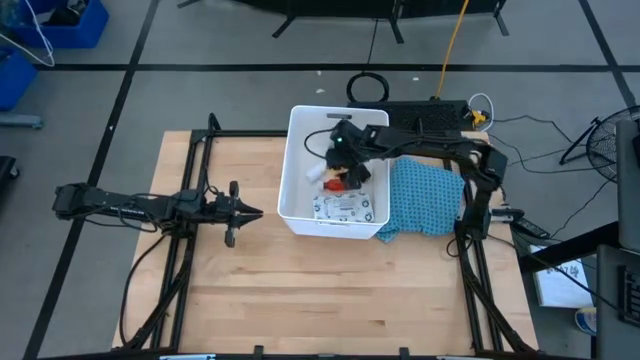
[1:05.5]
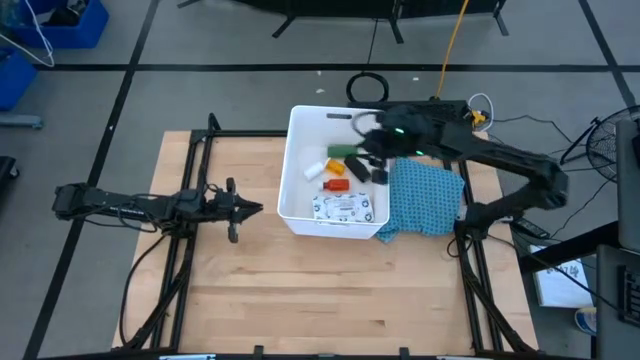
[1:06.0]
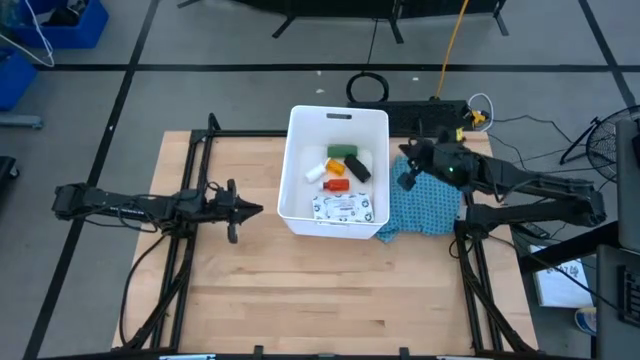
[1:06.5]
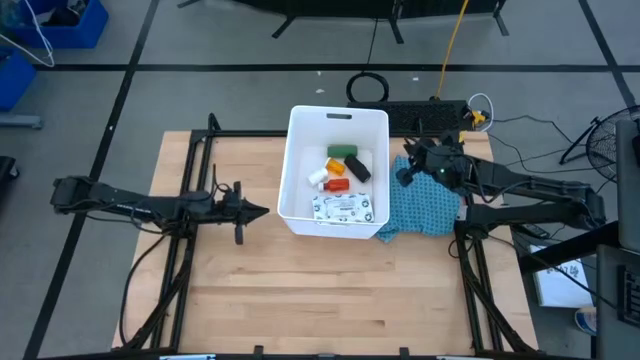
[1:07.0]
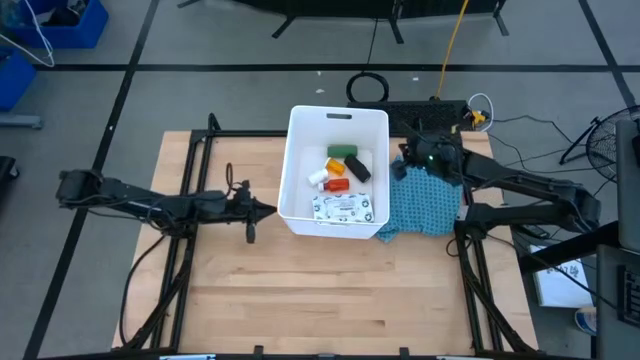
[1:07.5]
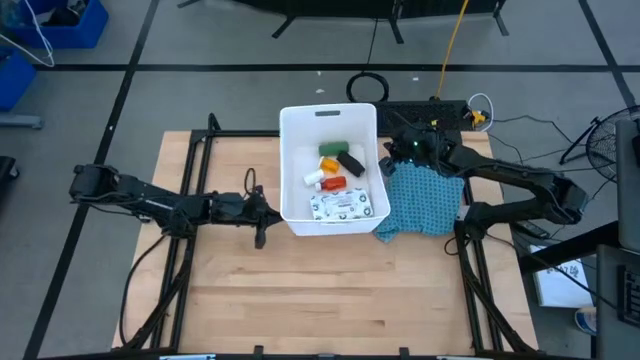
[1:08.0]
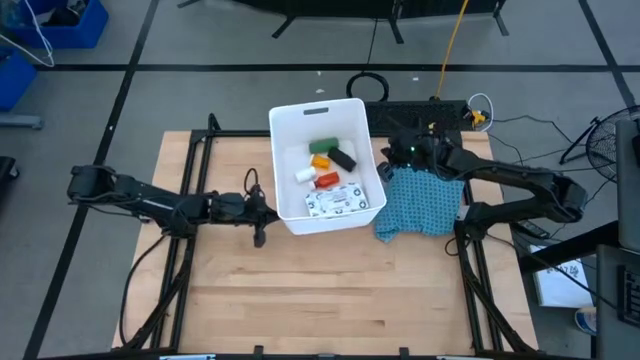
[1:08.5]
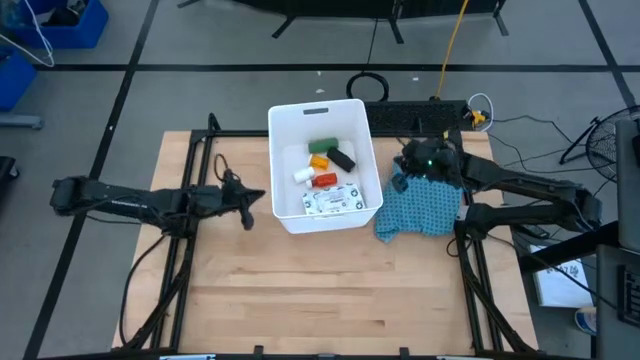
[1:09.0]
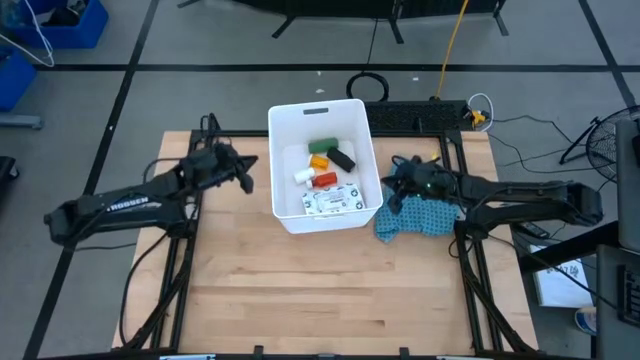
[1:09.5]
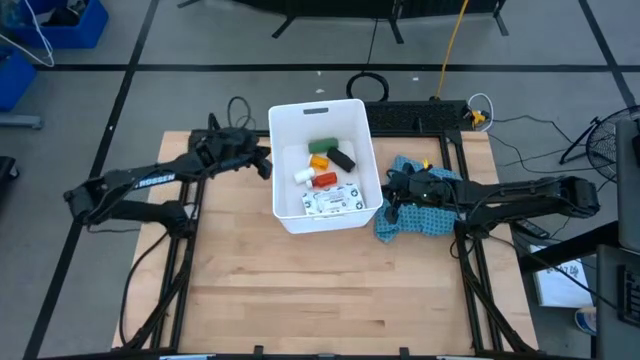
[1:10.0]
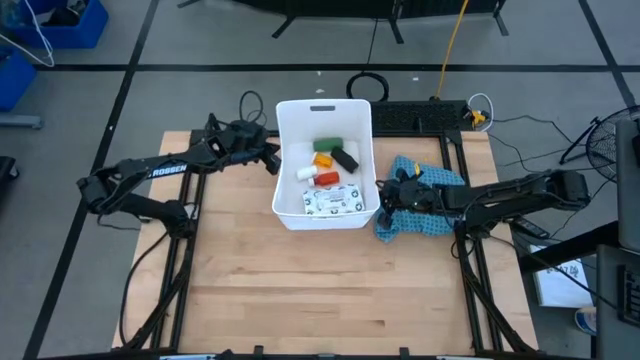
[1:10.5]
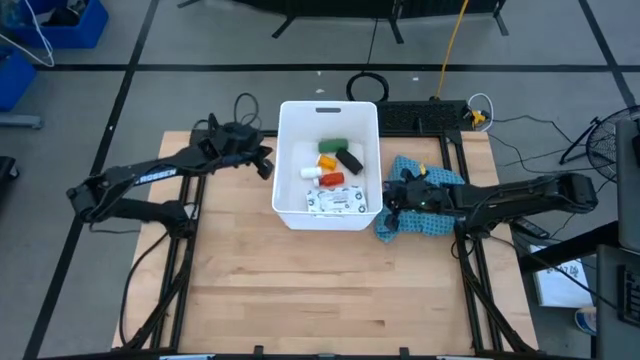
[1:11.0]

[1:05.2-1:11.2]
Task: Pick & place medical supplies in basket/bin
Adjust the bin

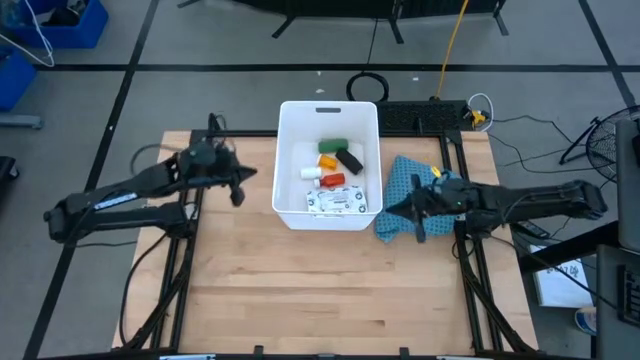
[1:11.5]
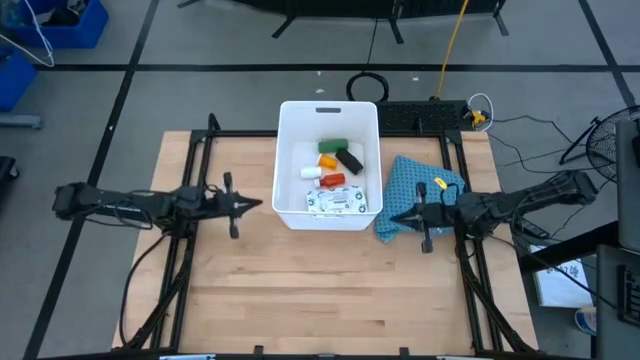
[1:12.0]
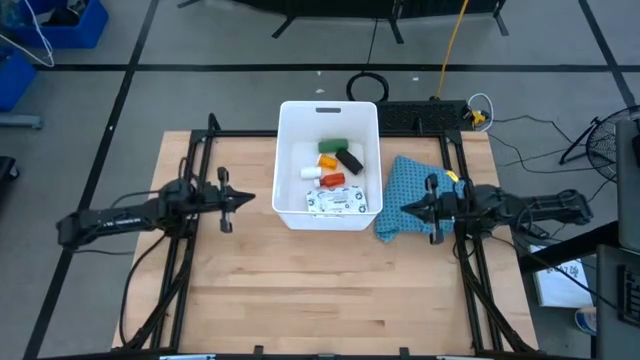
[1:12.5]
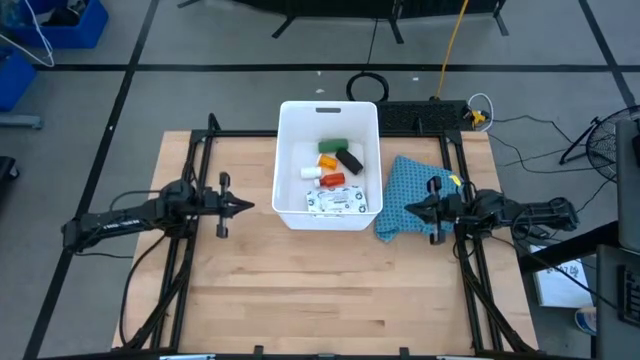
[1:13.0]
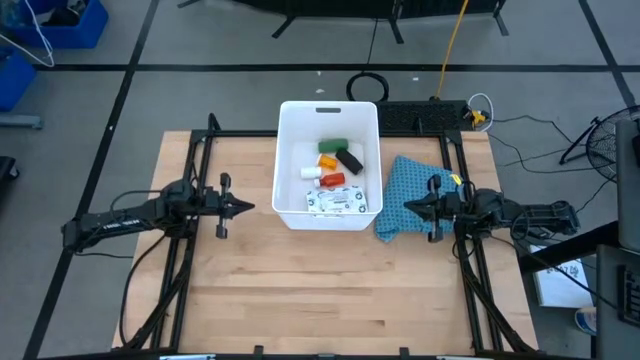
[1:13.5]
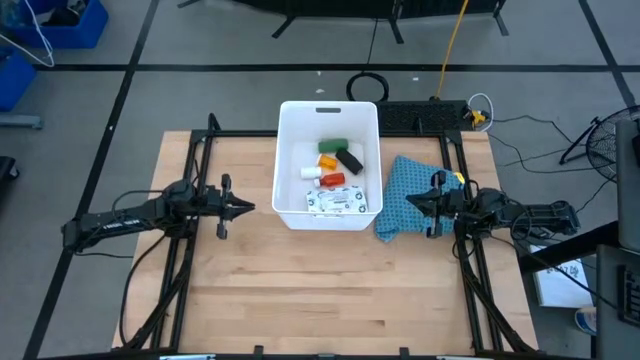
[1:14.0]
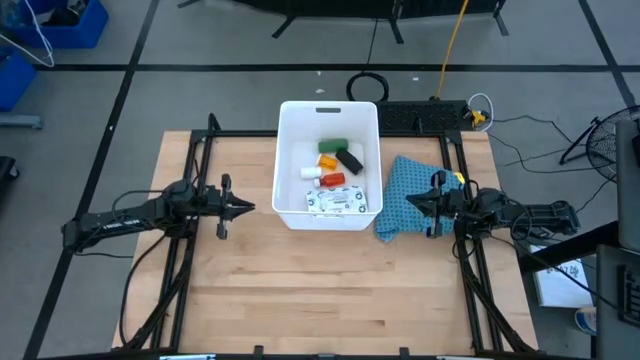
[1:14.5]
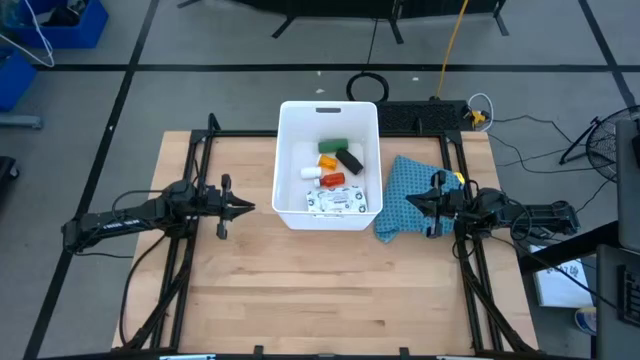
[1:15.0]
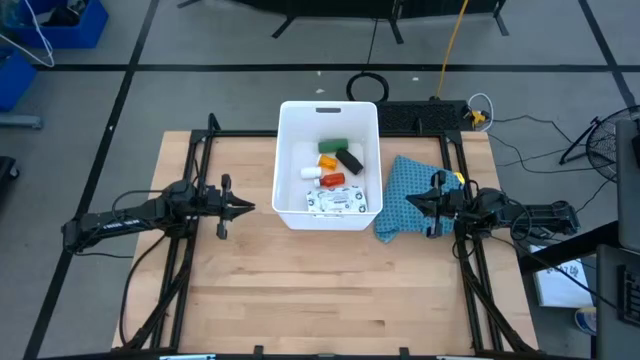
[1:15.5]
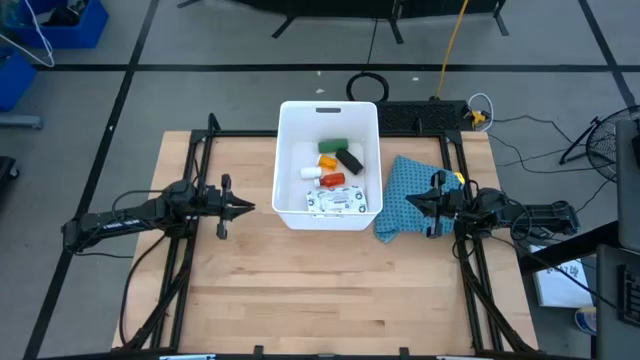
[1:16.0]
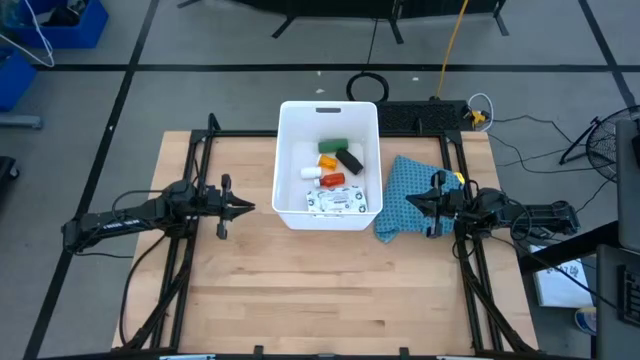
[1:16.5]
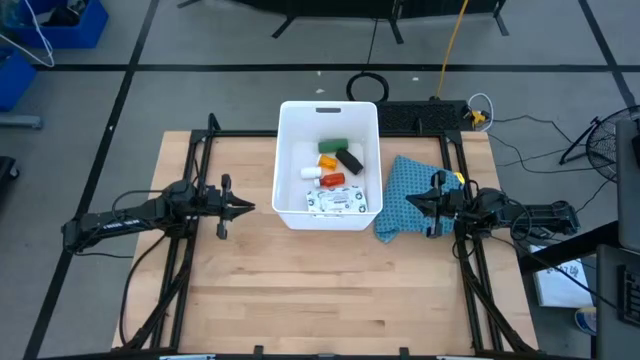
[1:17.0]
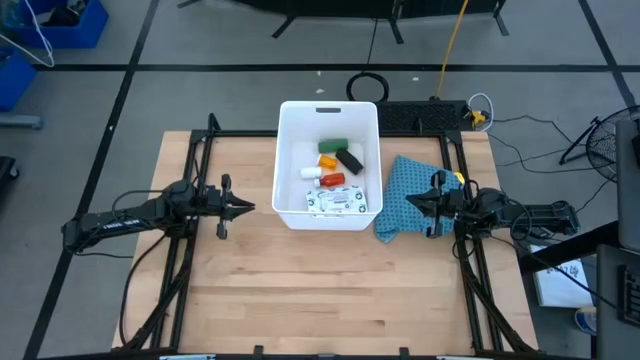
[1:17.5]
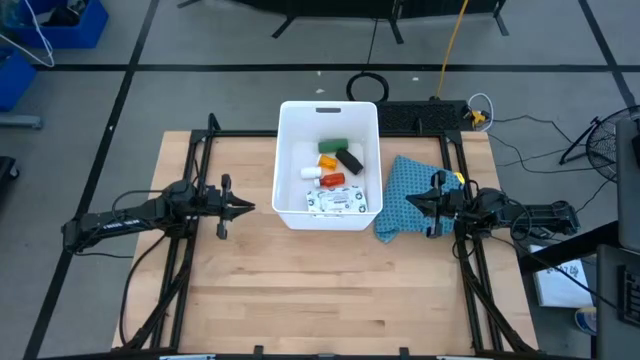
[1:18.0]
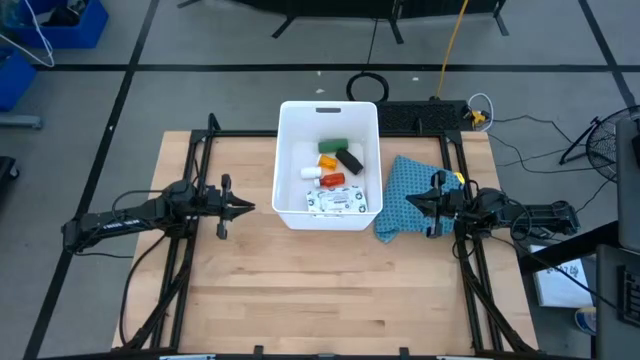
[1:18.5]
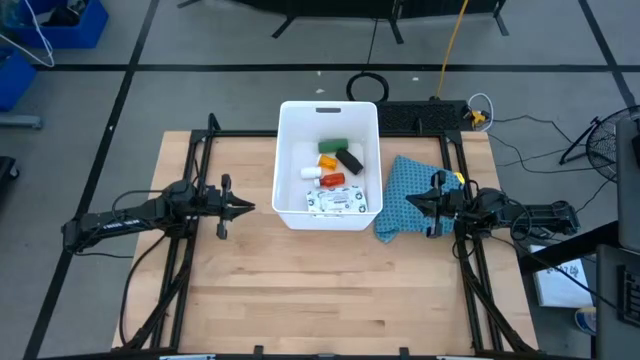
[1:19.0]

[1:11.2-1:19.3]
Return to Home Position

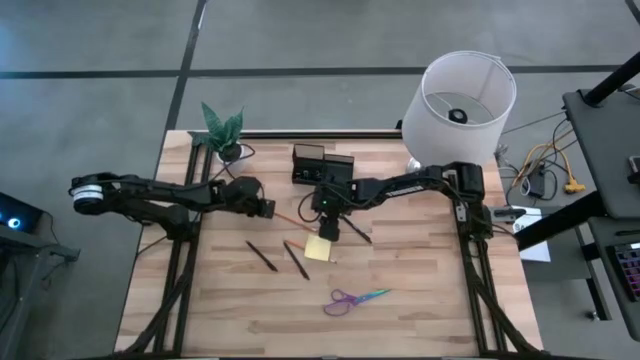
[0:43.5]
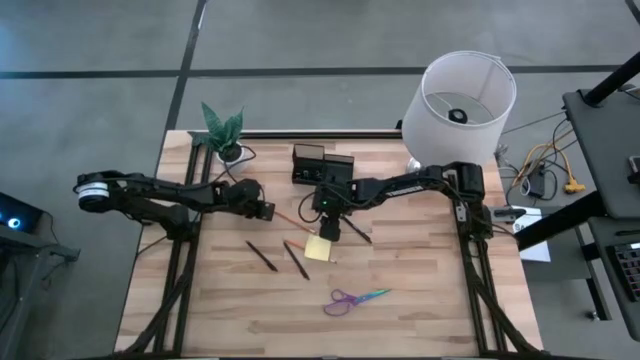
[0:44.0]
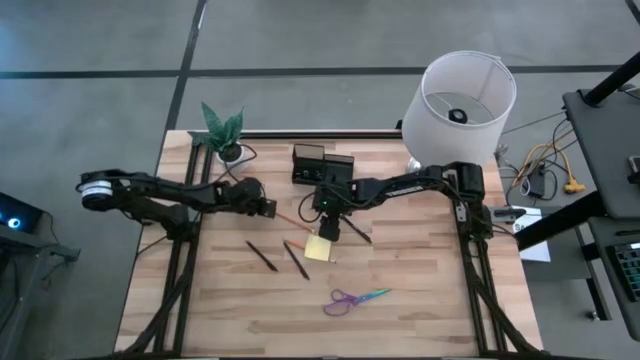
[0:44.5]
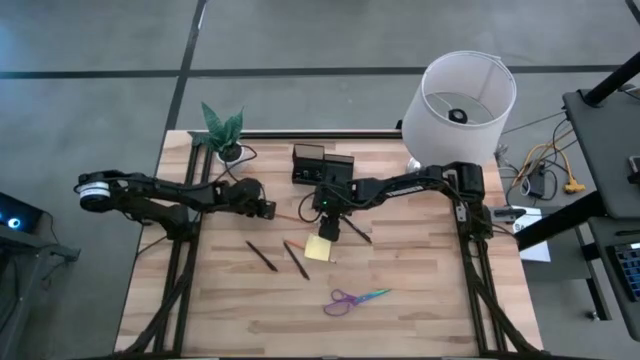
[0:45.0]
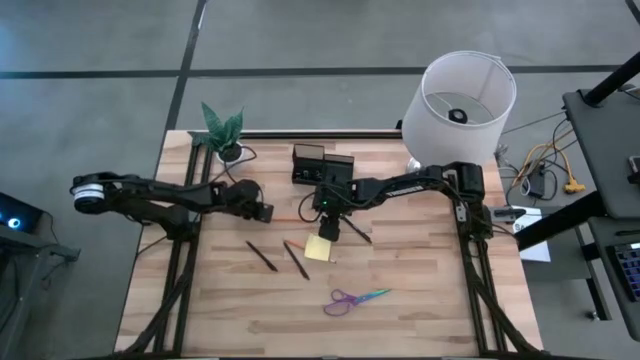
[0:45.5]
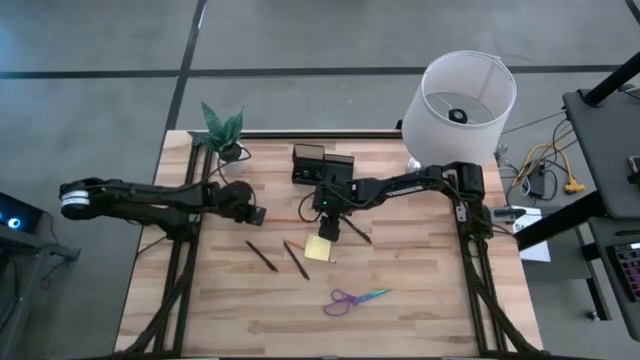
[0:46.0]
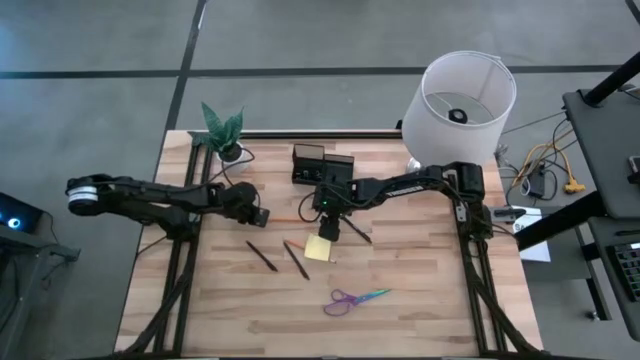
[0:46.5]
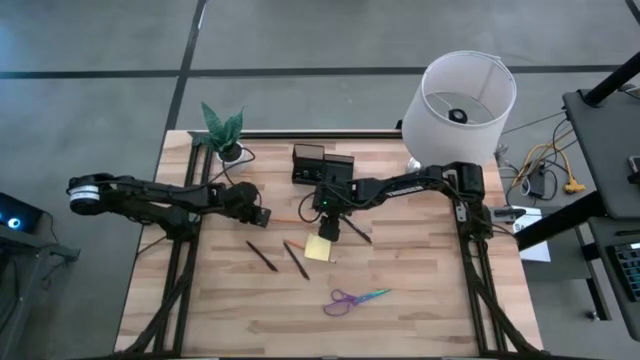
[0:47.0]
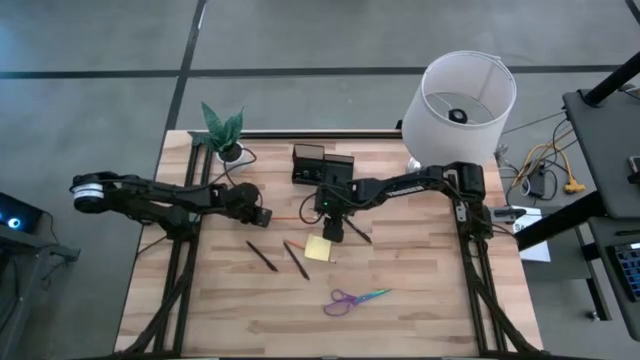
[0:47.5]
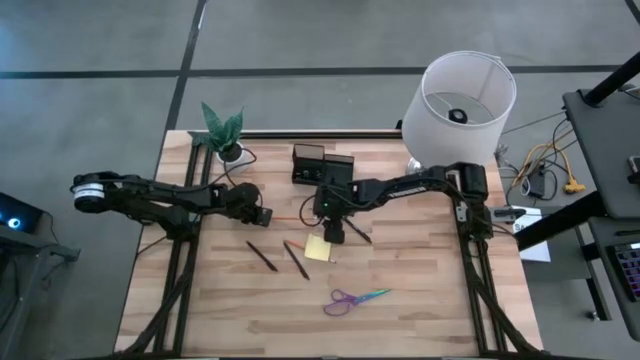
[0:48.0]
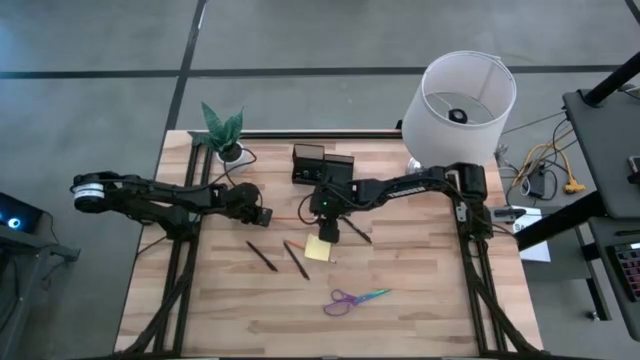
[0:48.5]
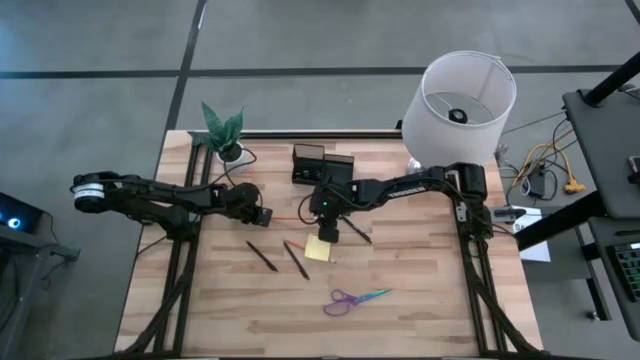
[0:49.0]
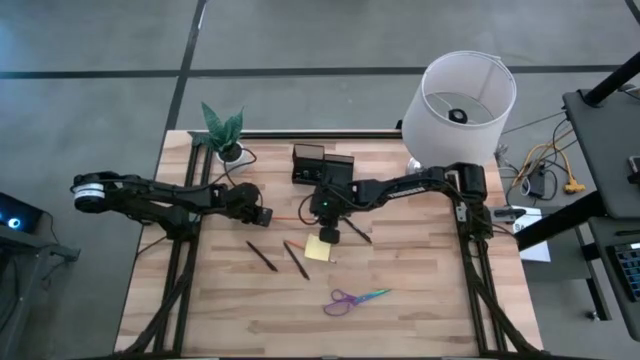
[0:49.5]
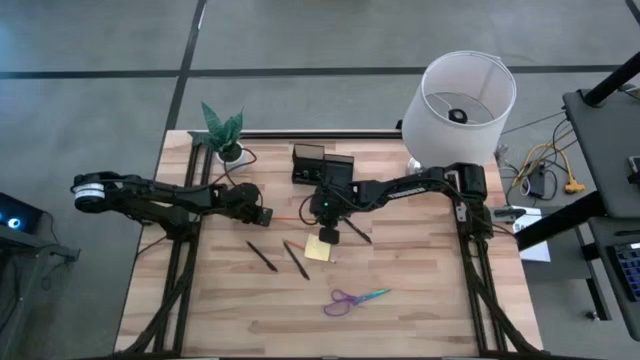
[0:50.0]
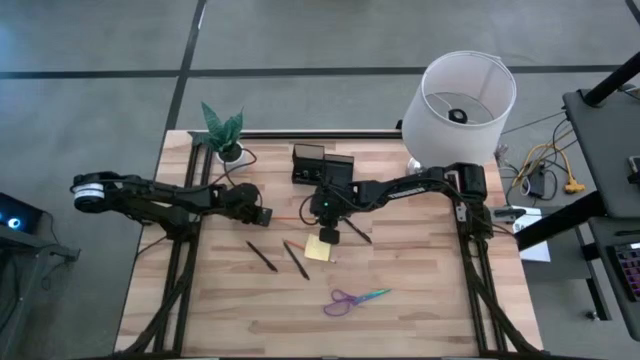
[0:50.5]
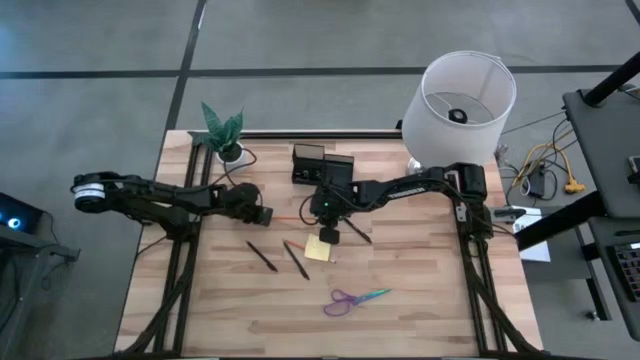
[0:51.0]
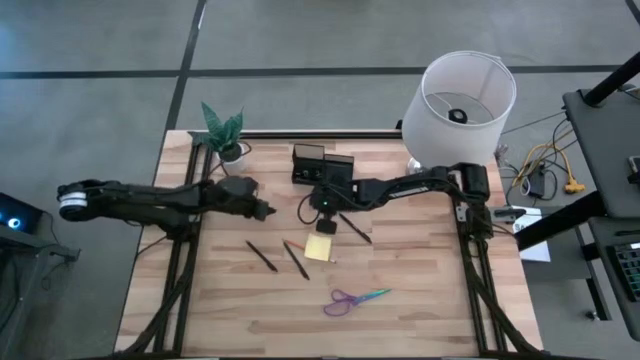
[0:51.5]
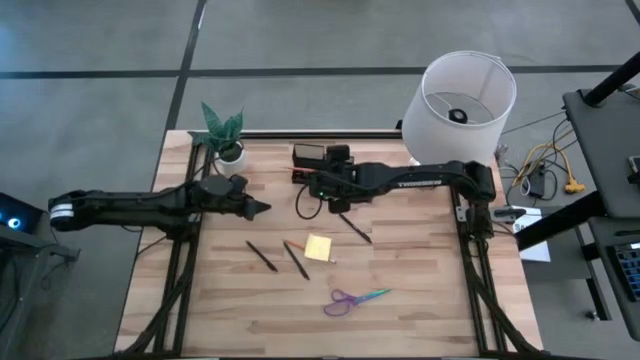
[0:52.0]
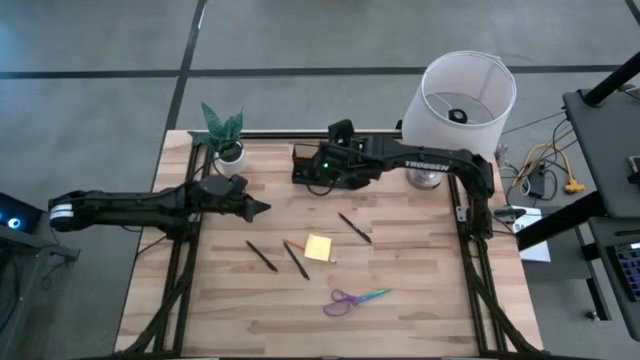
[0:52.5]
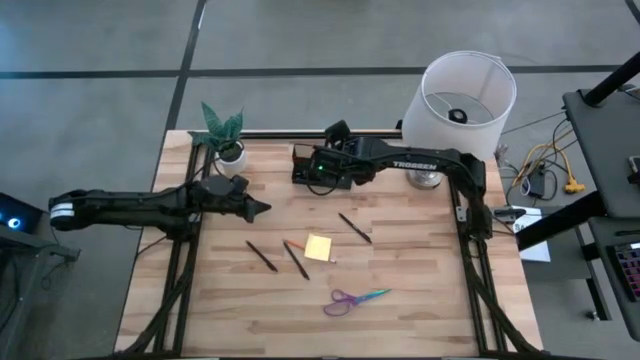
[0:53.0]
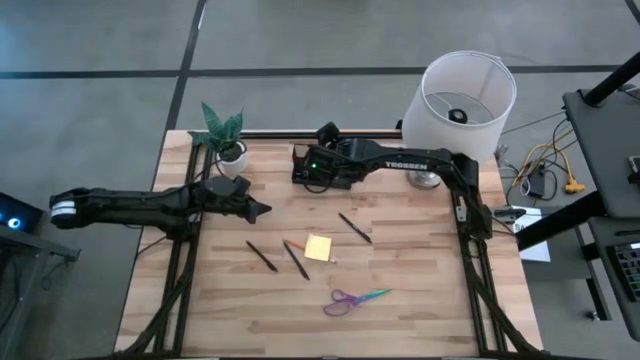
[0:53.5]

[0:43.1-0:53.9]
Task: Pick and place office supplies into organizer
Put the top yellow pencil into the black desk organizer
